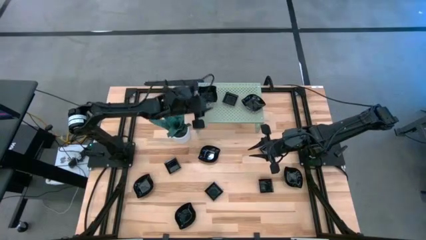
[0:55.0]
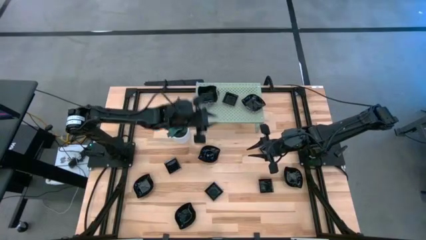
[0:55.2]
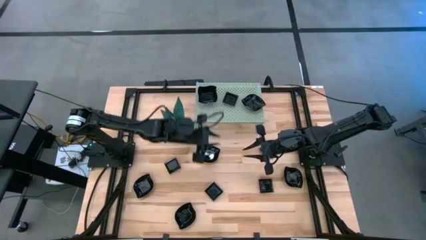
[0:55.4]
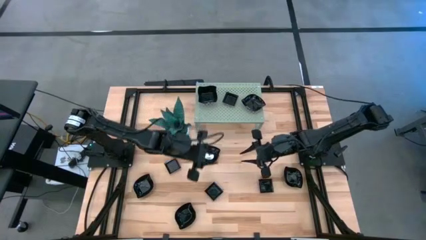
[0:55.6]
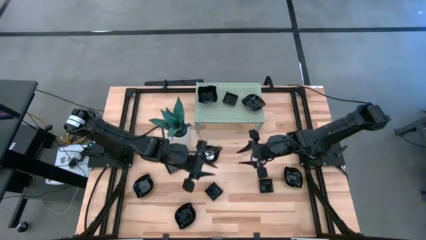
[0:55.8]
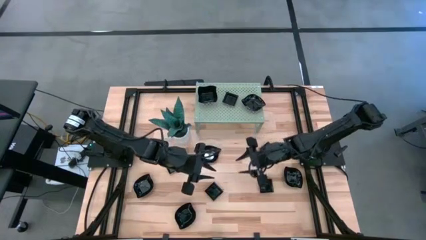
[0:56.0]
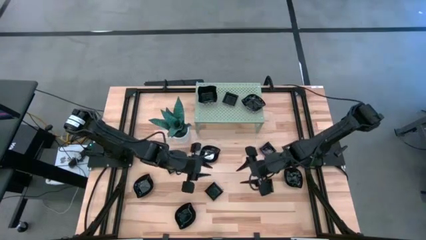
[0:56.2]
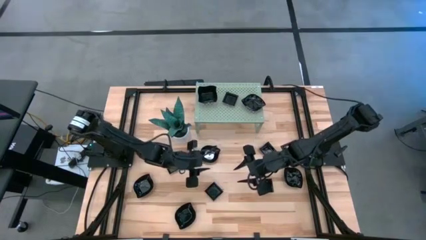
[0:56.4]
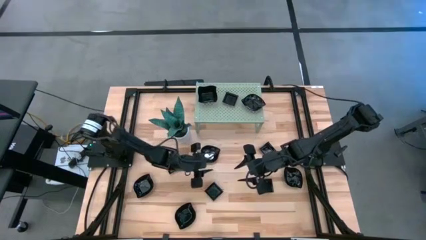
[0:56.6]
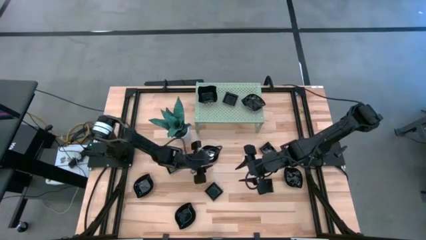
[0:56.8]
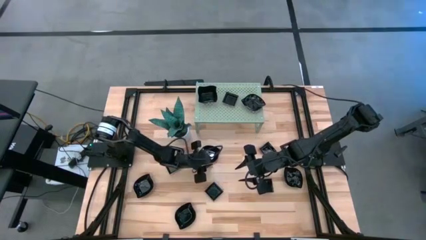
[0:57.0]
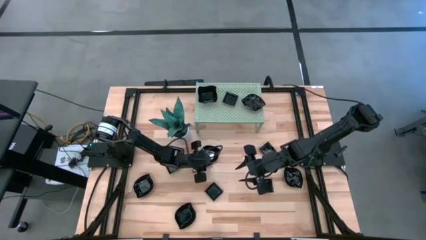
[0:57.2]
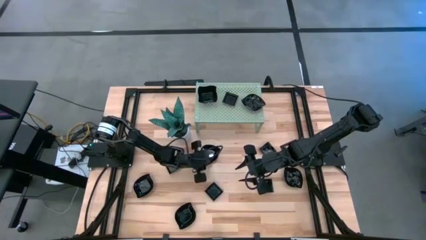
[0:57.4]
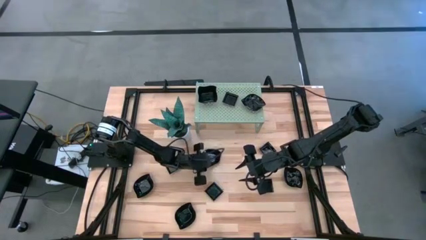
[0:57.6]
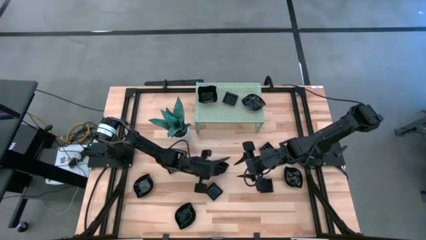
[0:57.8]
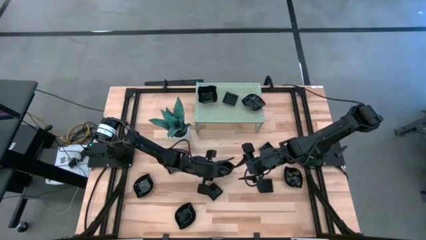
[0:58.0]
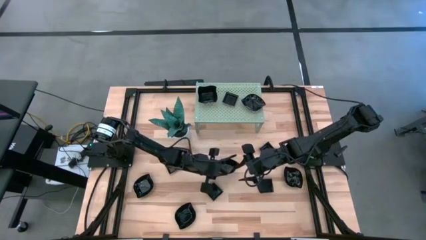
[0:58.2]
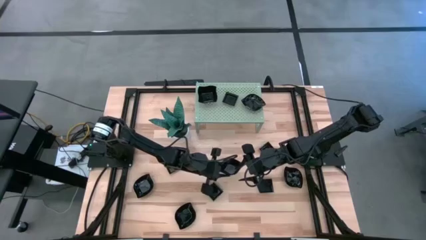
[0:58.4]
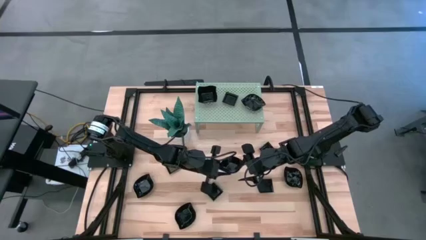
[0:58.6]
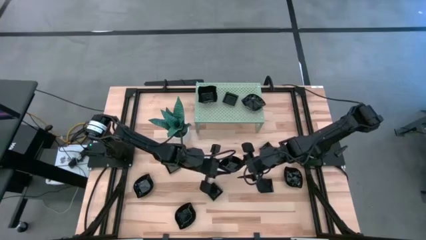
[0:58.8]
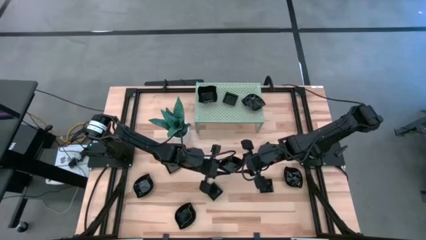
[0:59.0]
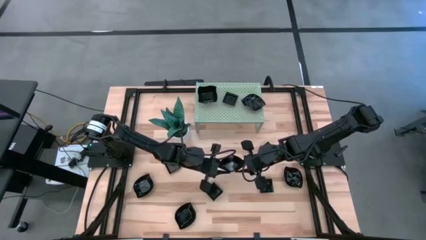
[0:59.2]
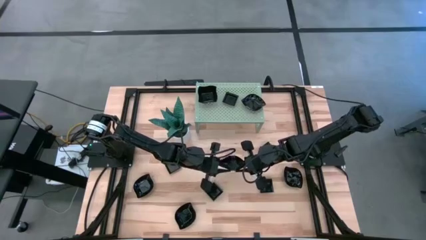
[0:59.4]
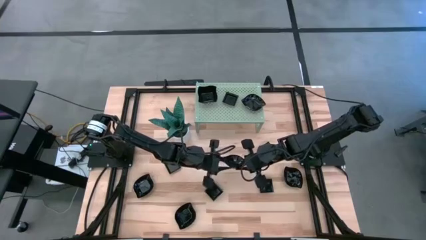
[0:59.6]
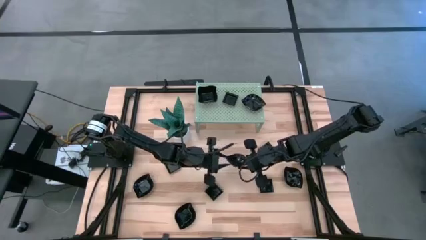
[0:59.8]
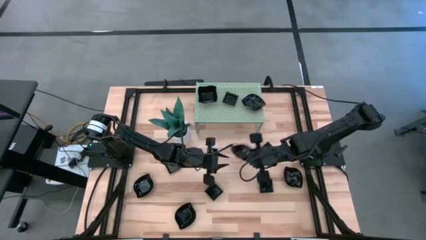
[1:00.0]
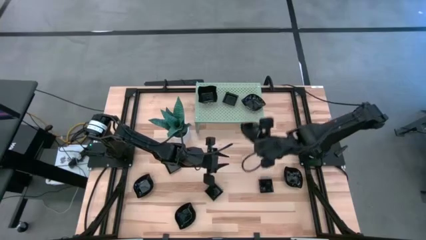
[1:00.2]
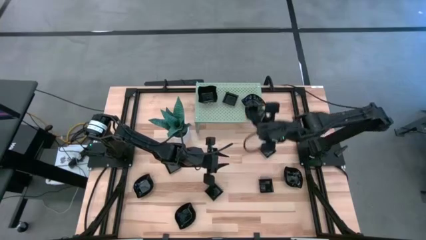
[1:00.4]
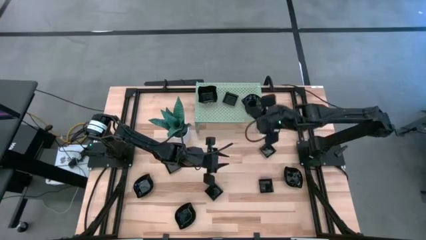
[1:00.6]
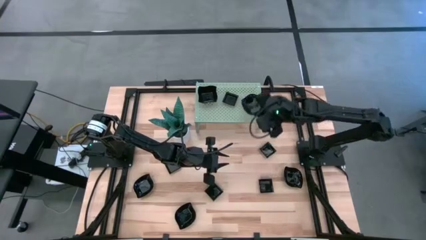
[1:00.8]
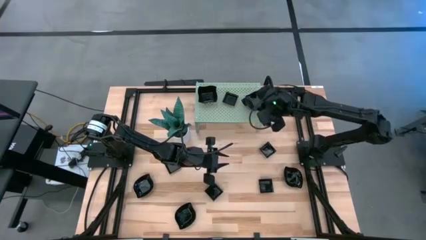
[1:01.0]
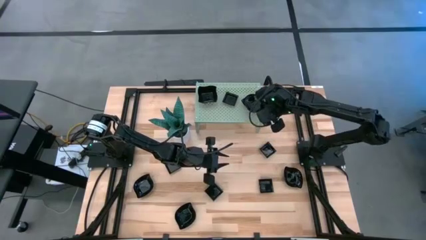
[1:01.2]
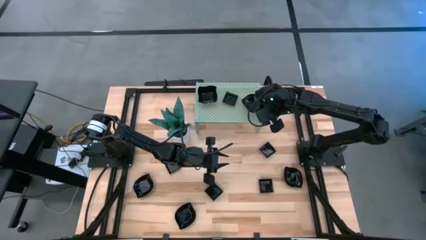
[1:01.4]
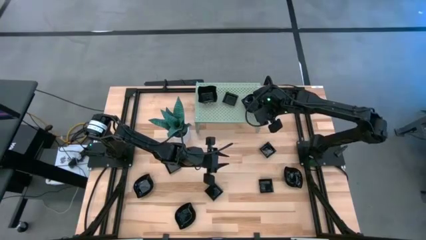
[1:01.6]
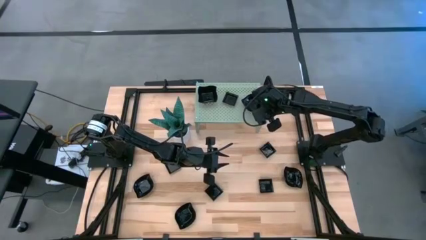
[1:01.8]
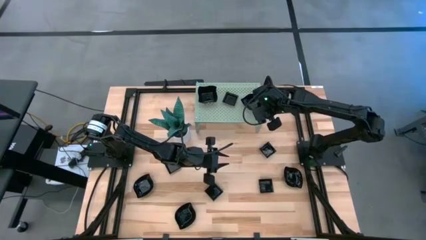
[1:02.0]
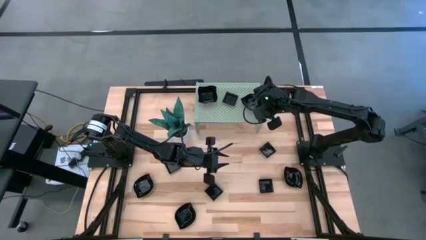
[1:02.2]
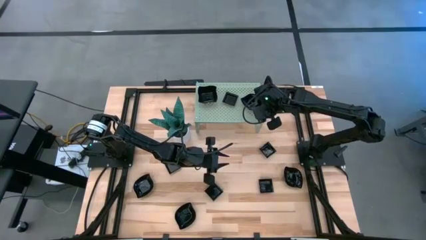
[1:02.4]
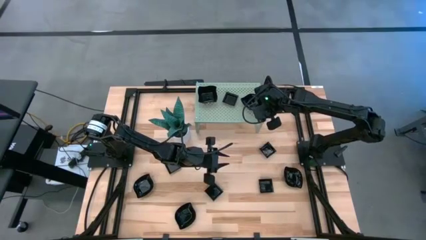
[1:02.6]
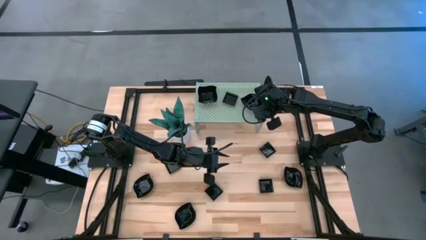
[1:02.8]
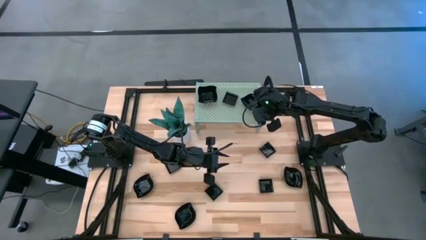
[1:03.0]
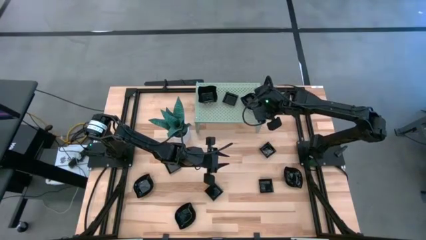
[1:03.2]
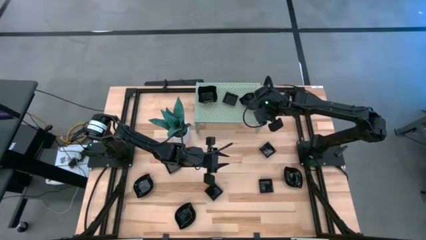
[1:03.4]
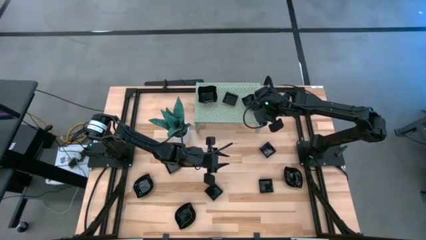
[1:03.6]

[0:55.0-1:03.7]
Task: Pick & Place Mini shaped plates
Stack the leaf-shaped plate on top of the other leaf-shaped plate on the shelf

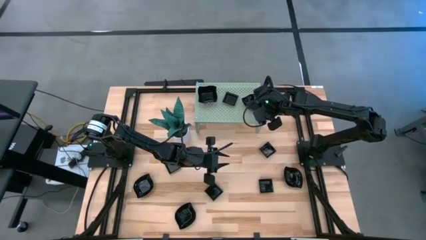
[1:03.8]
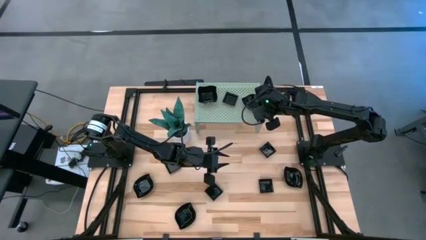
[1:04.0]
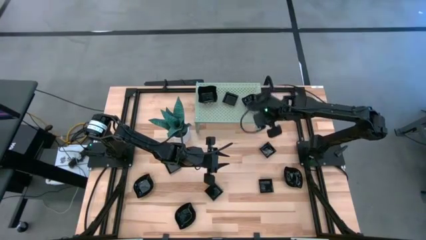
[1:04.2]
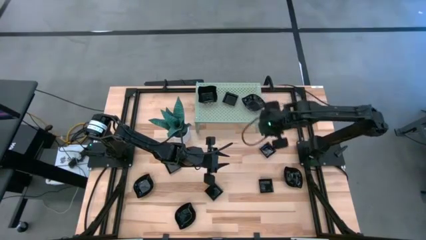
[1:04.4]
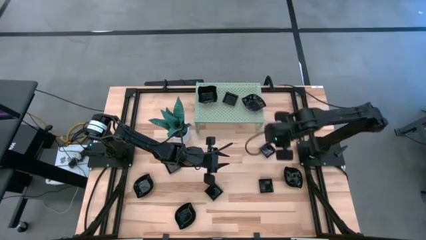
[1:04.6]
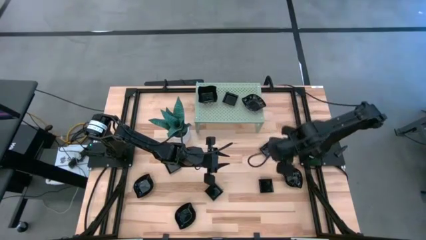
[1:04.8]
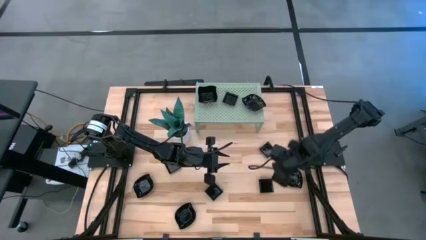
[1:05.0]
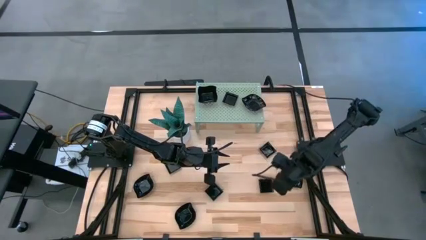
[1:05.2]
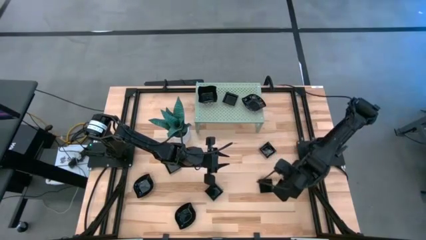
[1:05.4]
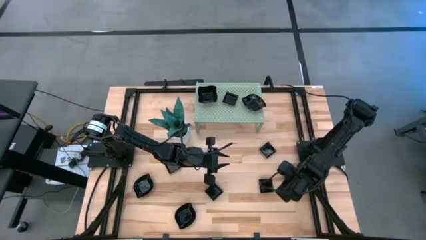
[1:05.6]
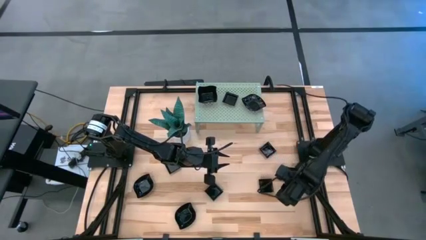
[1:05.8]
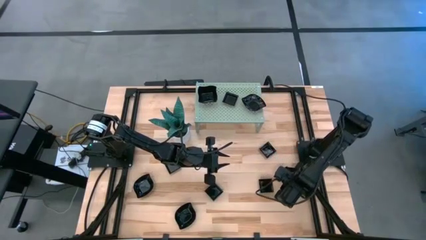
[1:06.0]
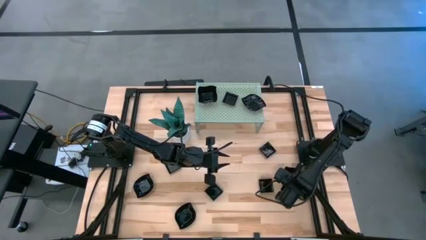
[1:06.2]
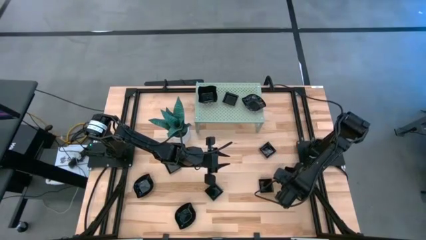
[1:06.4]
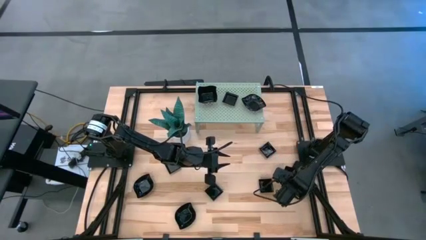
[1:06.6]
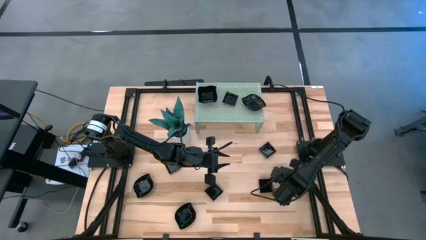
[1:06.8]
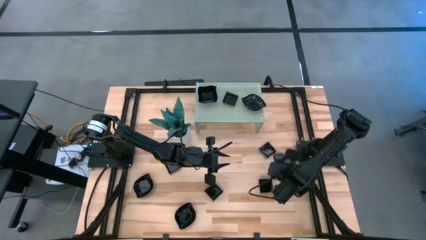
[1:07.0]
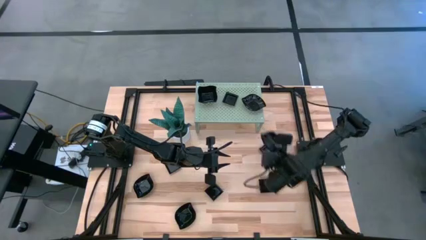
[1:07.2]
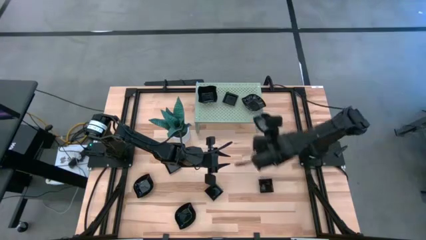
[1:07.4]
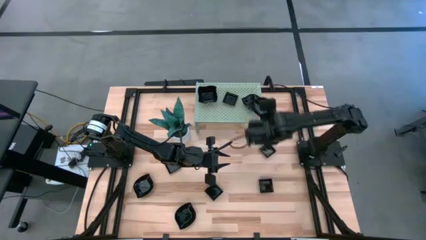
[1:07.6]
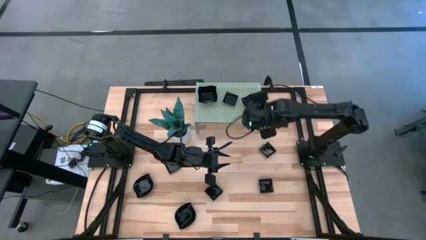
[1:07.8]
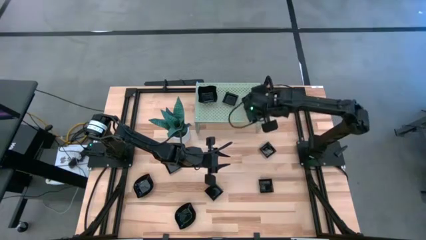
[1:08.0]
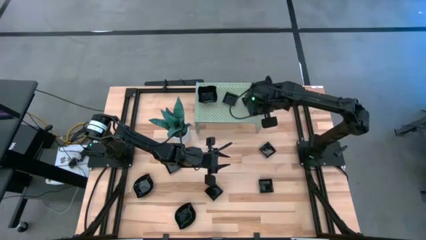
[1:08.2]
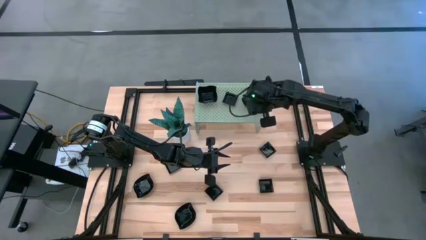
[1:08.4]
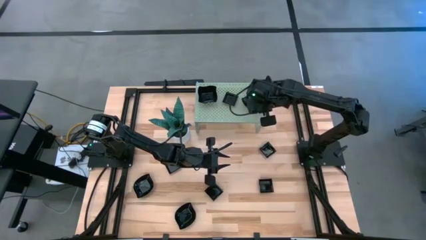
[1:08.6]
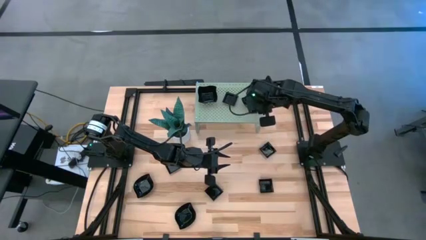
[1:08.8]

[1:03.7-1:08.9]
Stack the leaf-shaped plate on top of the other leaf-shaped plate on the shelf

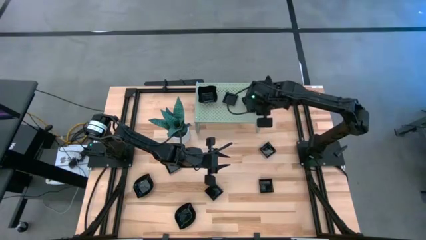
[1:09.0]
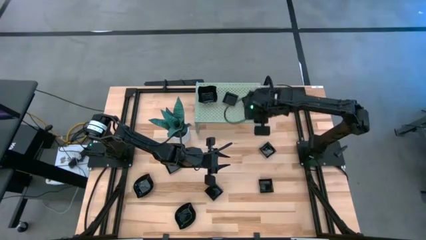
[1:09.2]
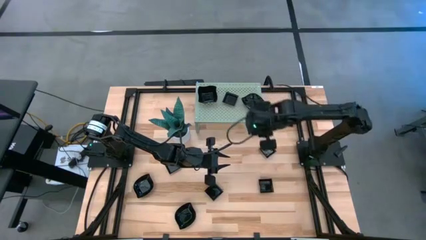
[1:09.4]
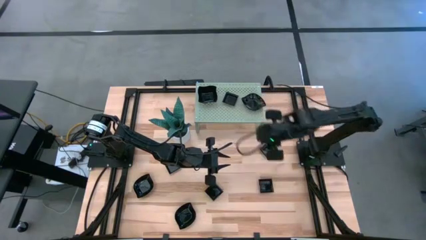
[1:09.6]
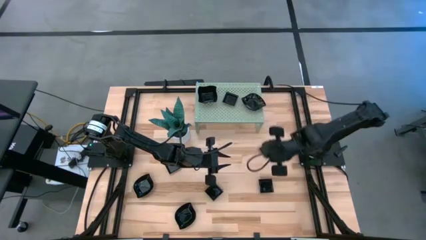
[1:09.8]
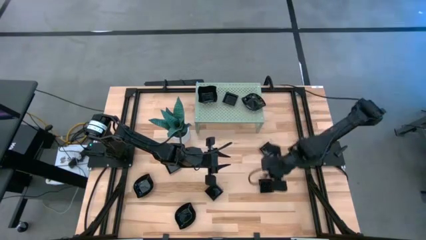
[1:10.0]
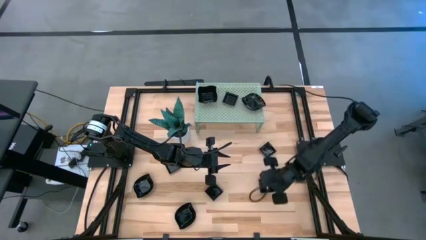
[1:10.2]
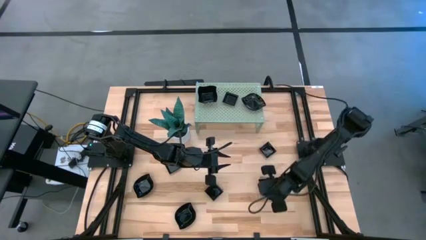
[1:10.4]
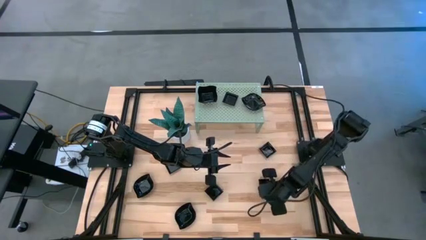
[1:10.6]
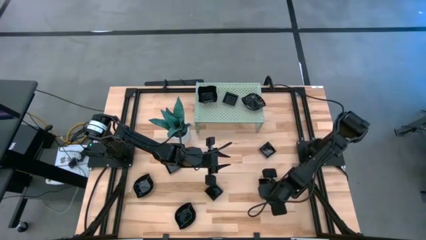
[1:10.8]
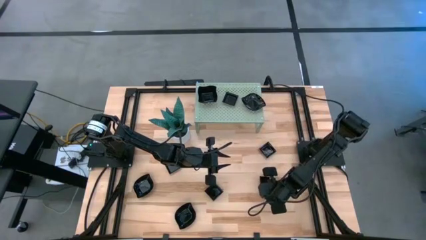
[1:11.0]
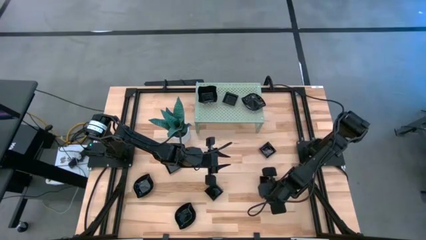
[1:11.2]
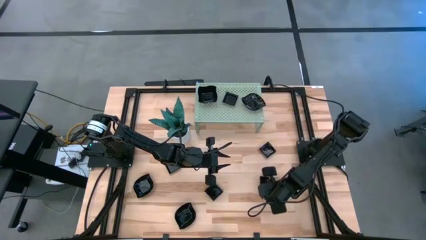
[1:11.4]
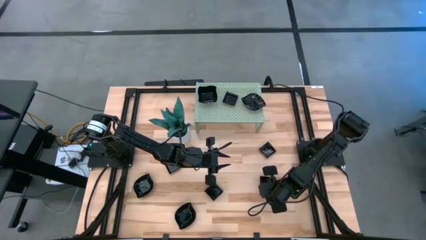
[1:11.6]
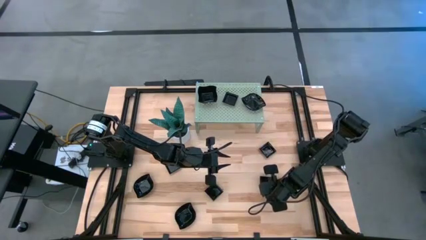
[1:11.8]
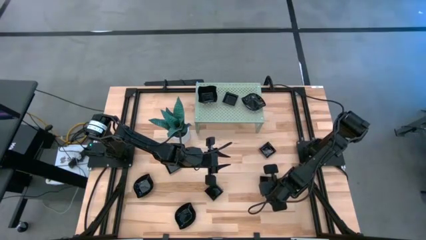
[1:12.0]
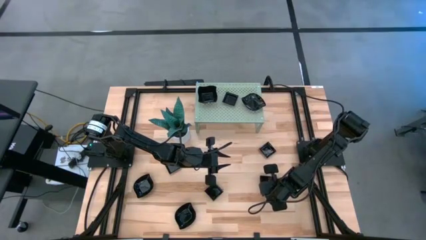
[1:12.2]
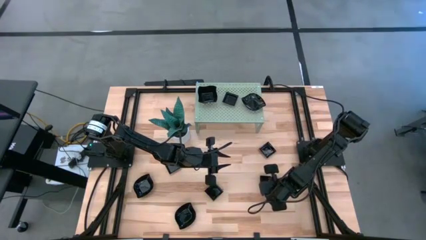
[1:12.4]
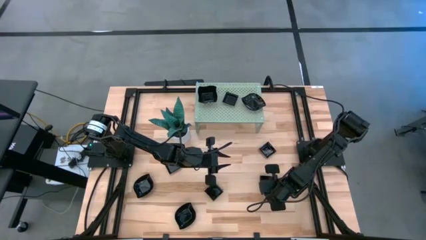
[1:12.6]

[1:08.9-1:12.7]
Stack the square plate on top of the other square plate on the shelf
